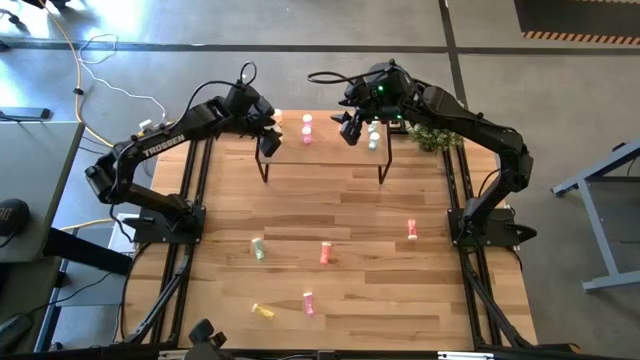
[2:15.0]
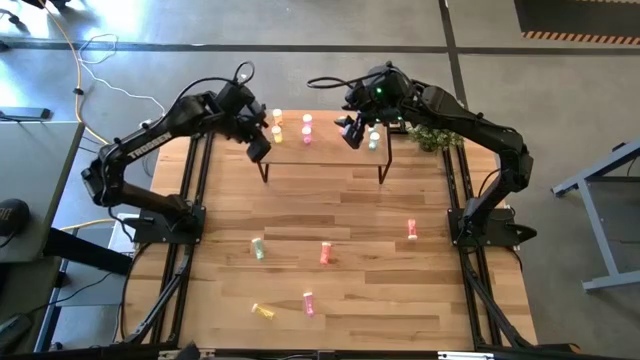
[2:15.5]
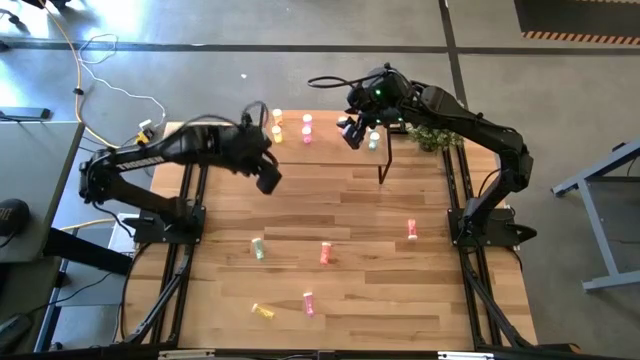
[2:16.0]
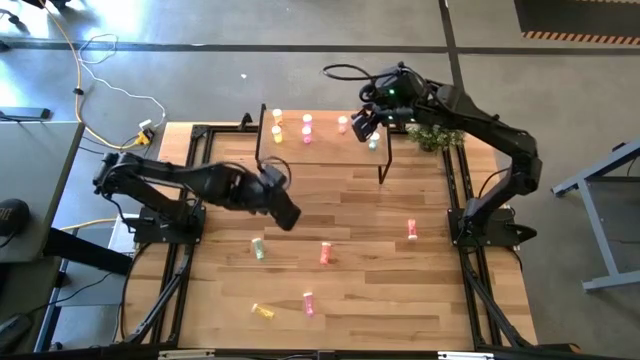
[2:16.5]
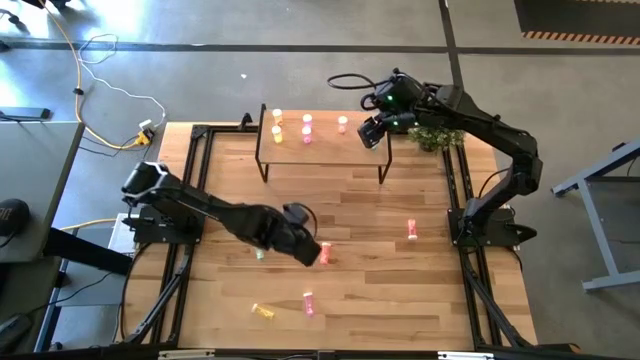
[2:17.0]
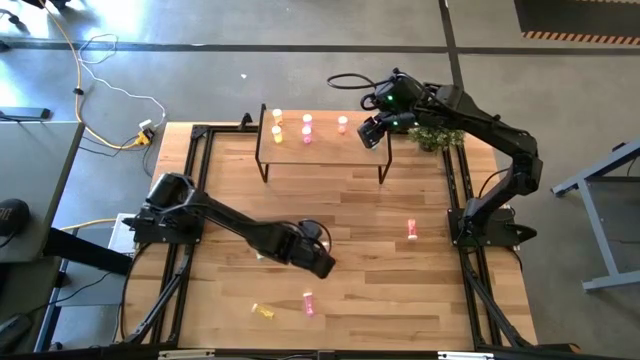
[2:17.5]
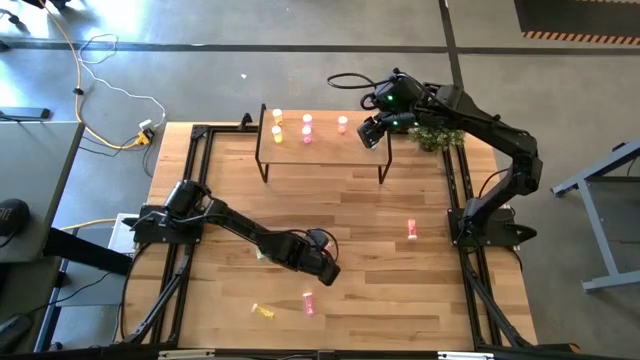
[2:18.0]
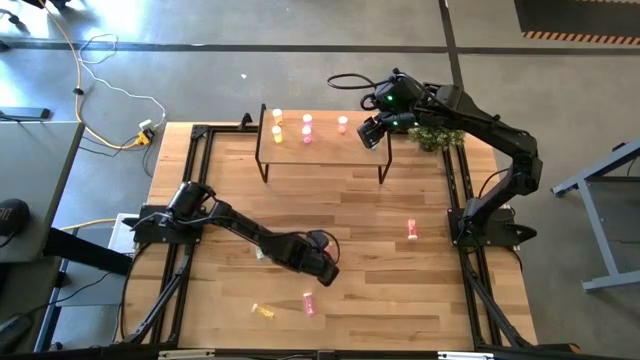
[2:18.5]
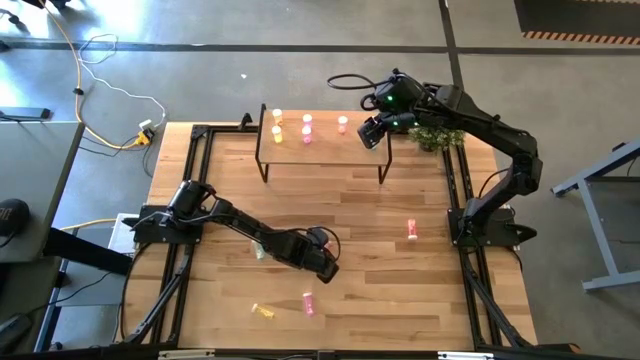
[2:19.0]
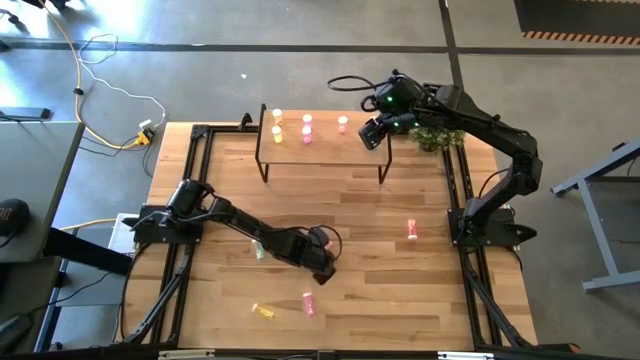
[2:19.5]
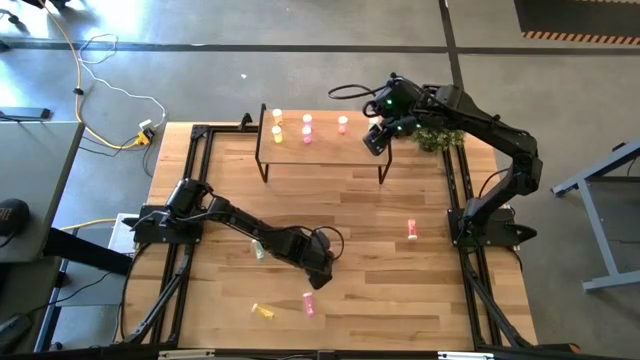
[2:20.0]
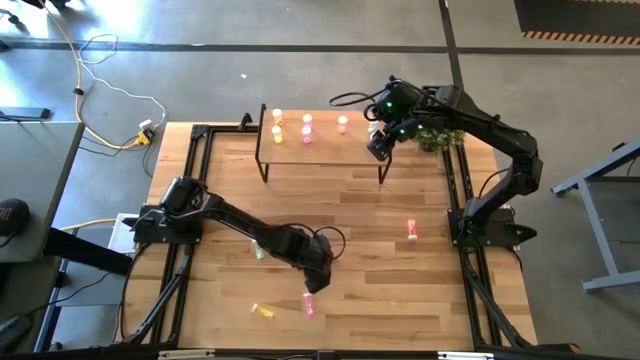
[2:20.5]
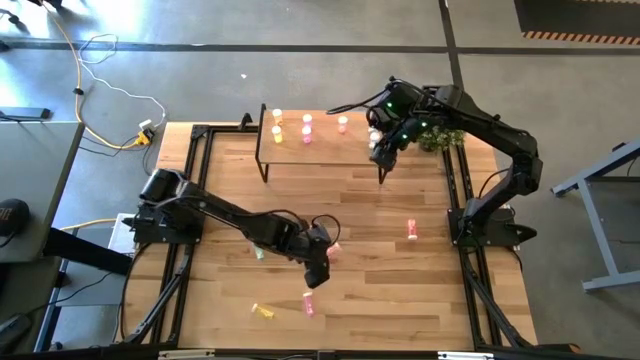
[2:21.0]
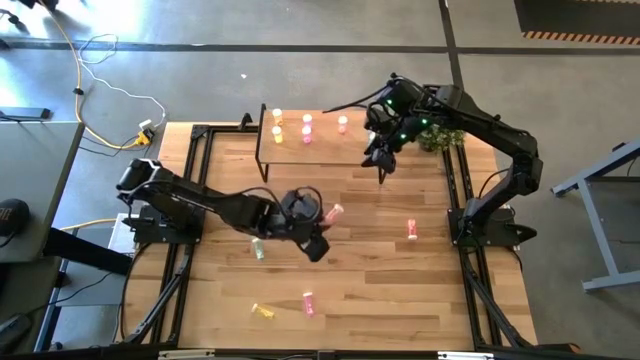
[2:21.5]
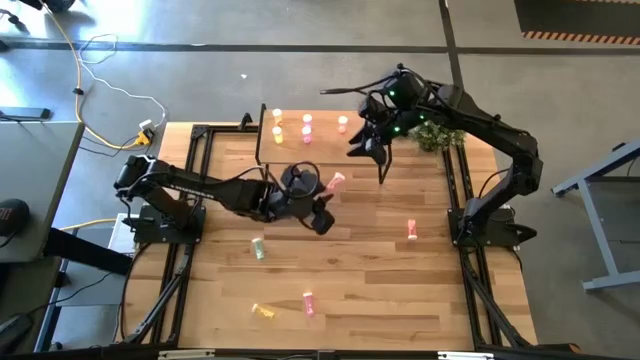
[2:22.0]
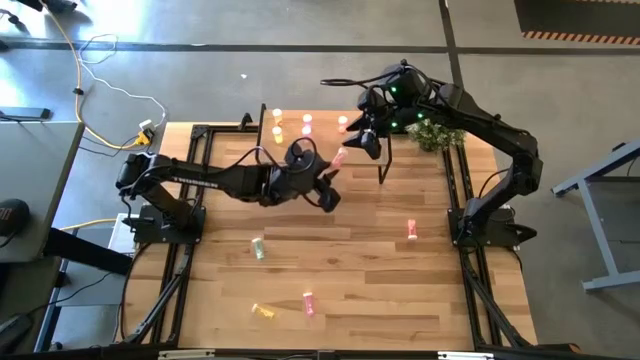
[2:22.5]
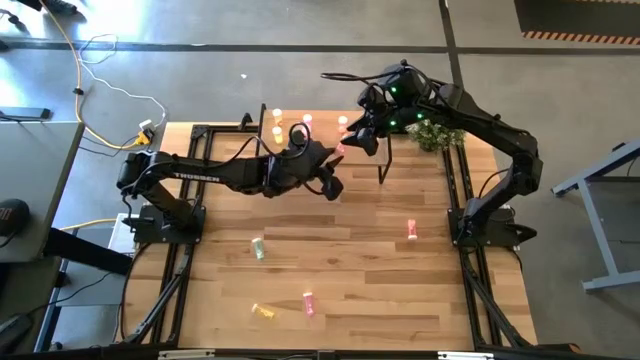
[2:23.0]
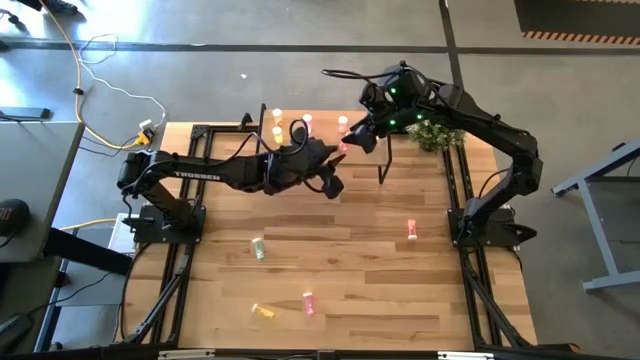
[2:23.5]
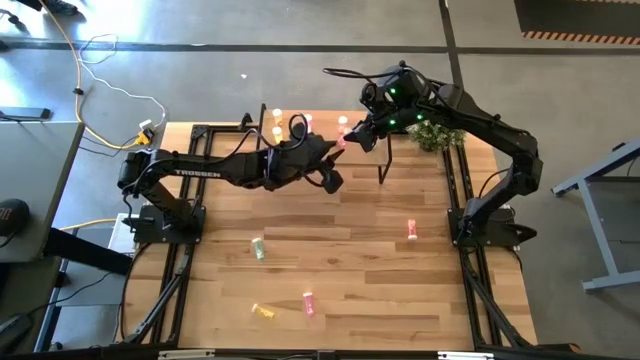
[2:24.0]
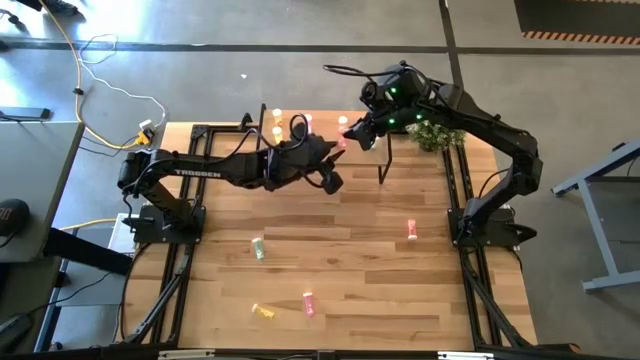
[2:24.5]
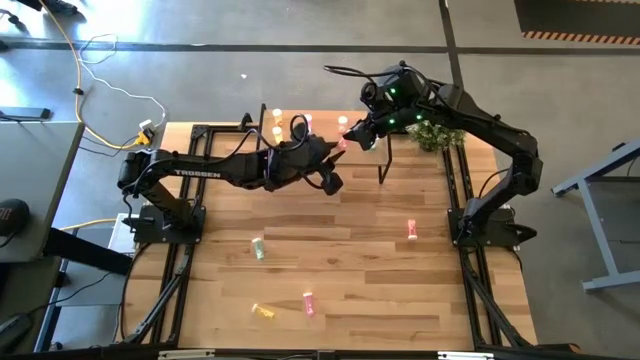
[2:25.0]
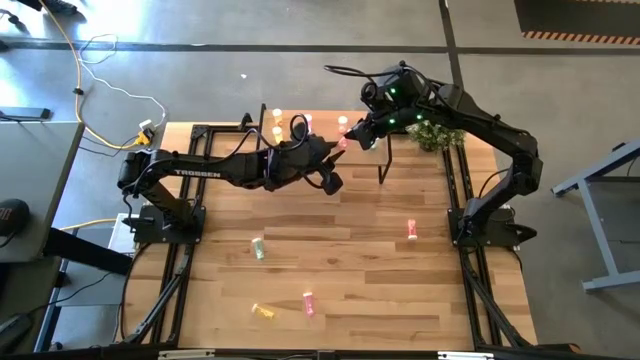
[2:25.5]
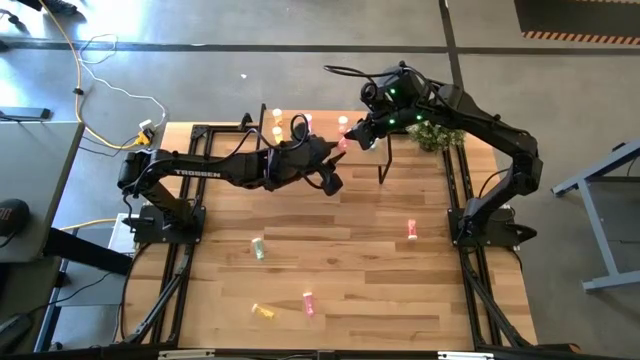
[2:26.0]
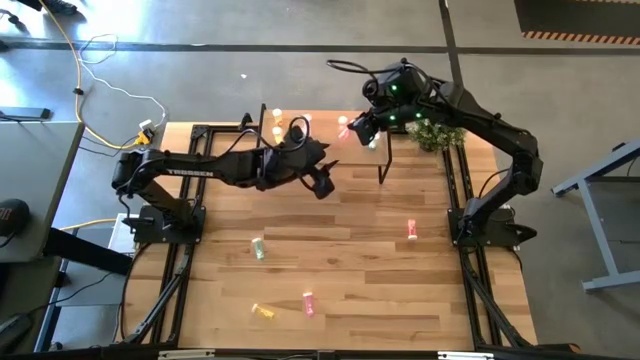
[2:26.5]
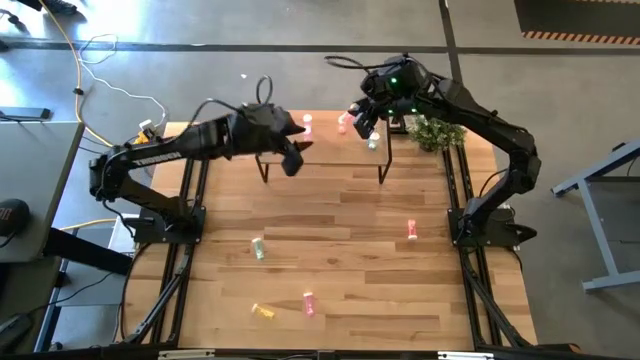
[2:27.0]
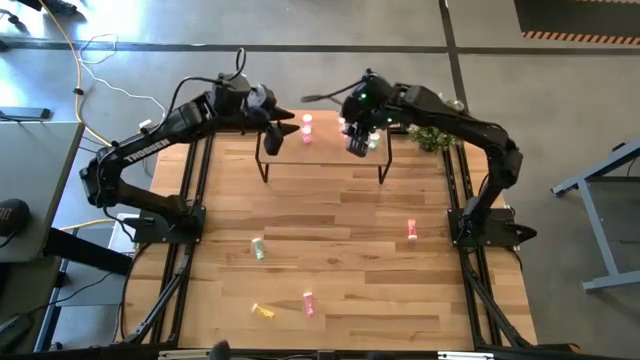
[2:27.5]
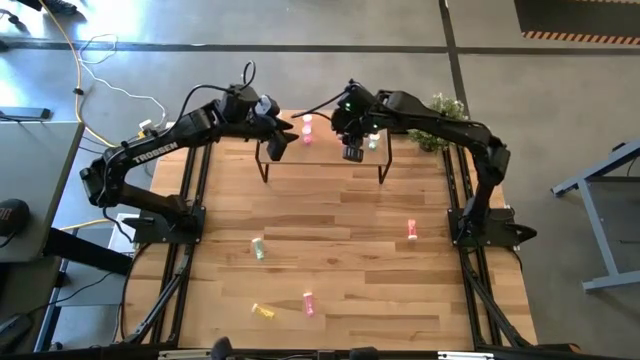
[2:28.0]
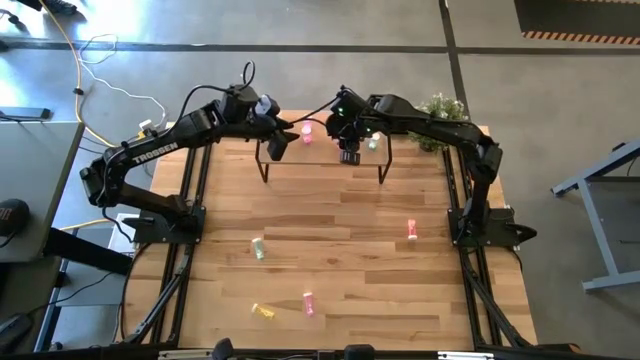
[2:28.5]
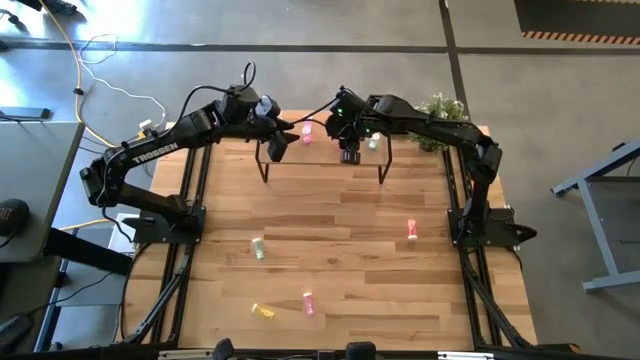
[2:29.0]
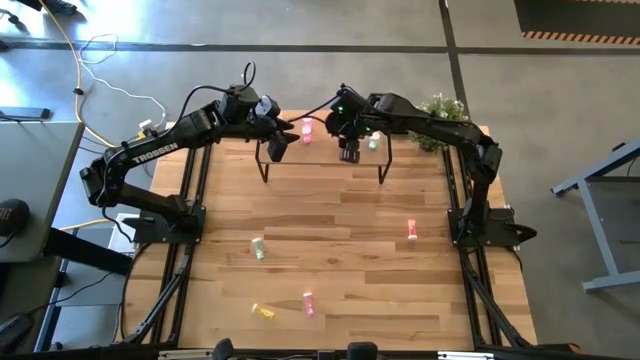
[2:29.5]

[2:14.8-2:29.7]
Task: Pick and place medicine bottles onto shelf by color
Put the bottom pink pill bottle on the shelf aligned with other pink pill bottles
